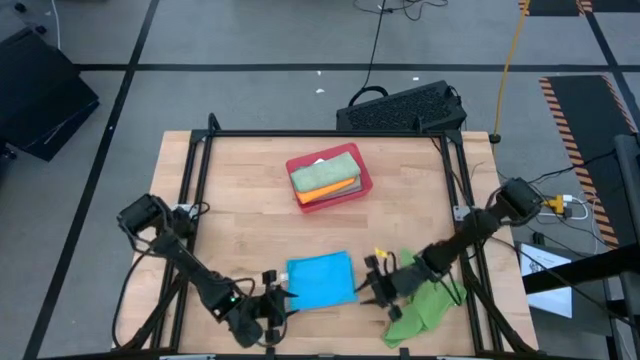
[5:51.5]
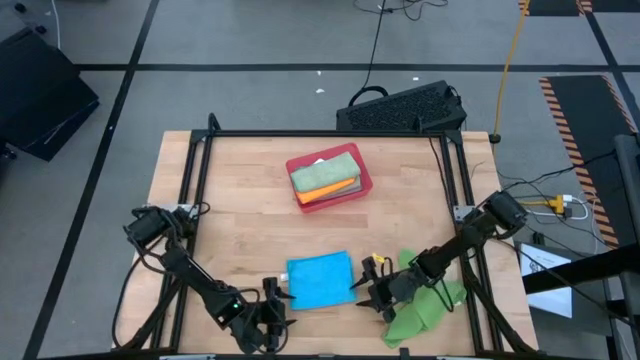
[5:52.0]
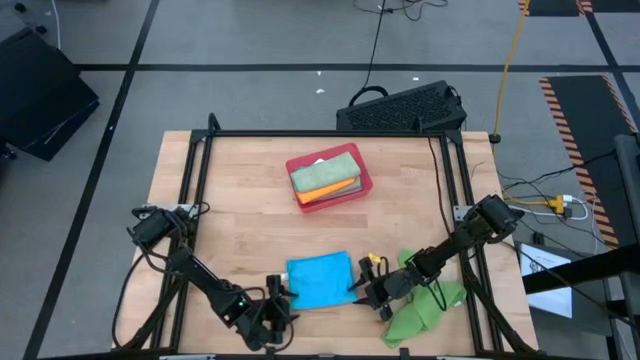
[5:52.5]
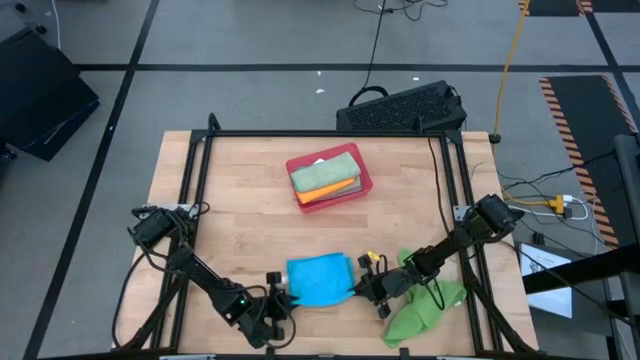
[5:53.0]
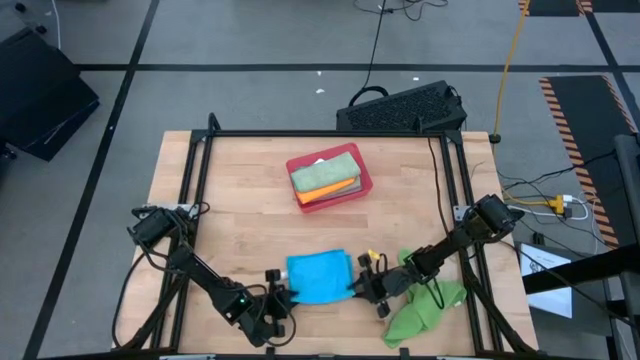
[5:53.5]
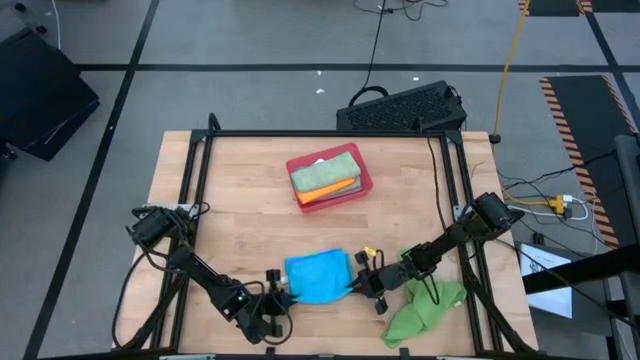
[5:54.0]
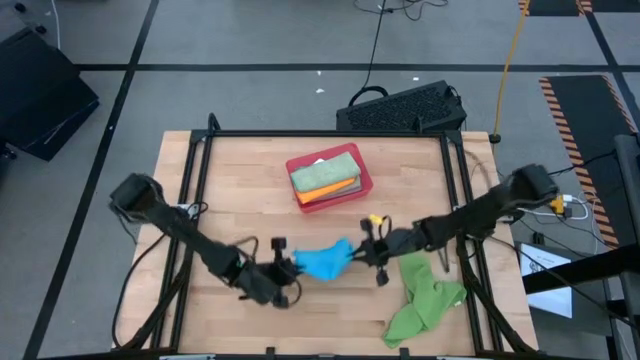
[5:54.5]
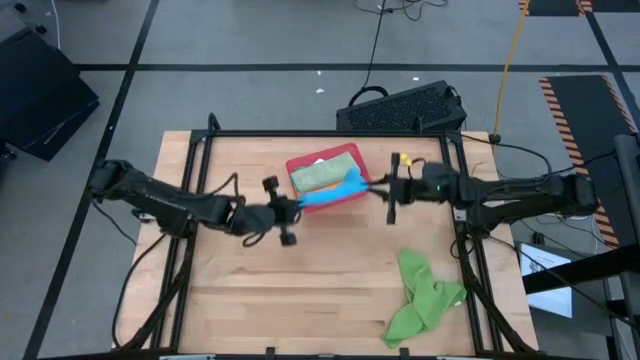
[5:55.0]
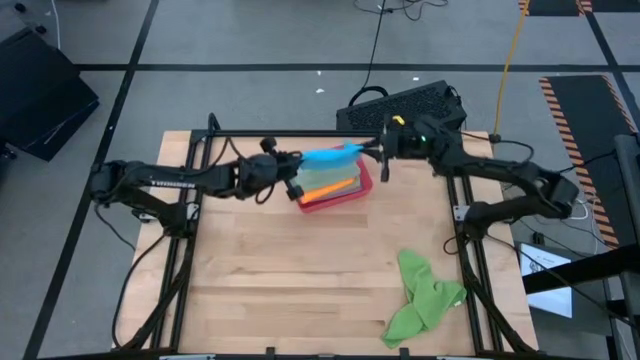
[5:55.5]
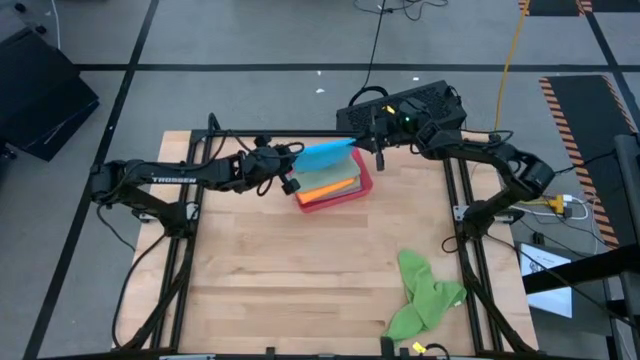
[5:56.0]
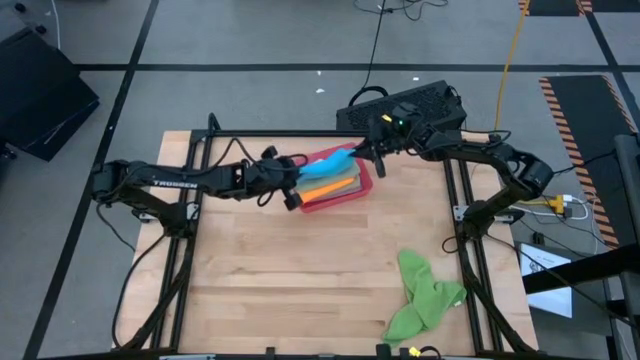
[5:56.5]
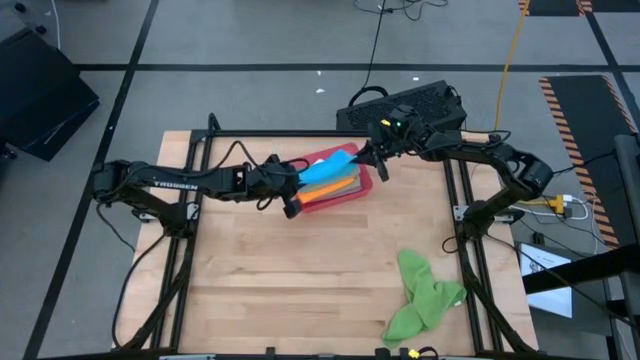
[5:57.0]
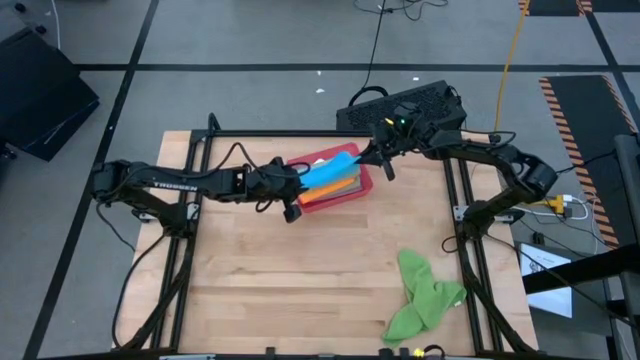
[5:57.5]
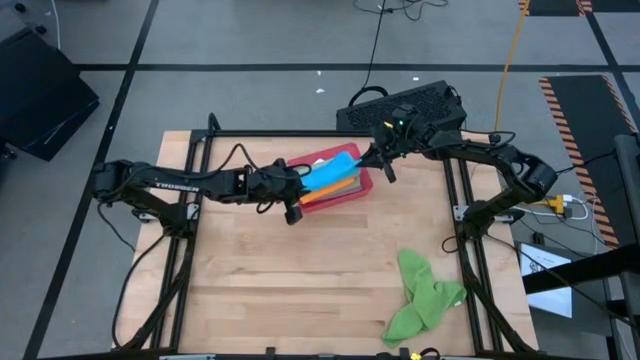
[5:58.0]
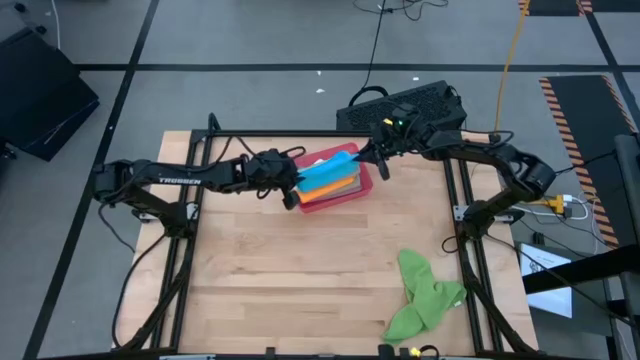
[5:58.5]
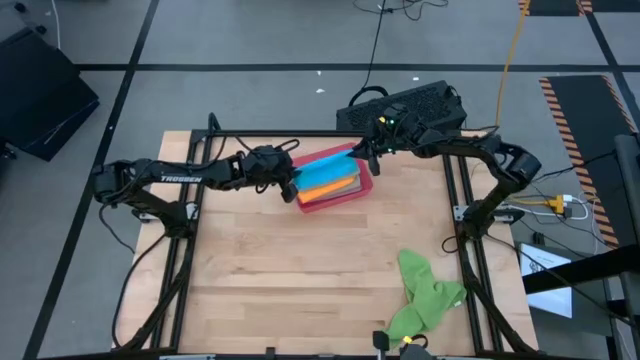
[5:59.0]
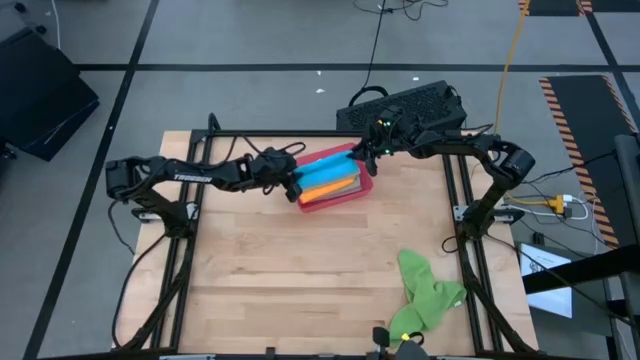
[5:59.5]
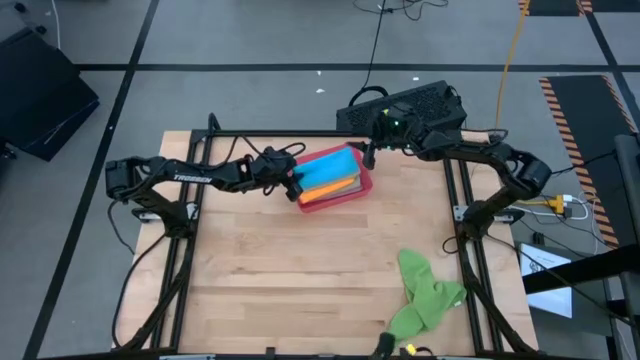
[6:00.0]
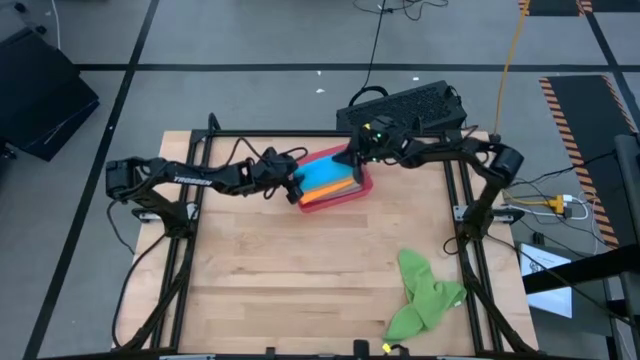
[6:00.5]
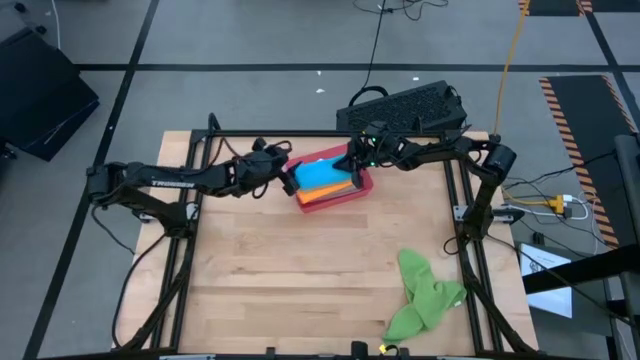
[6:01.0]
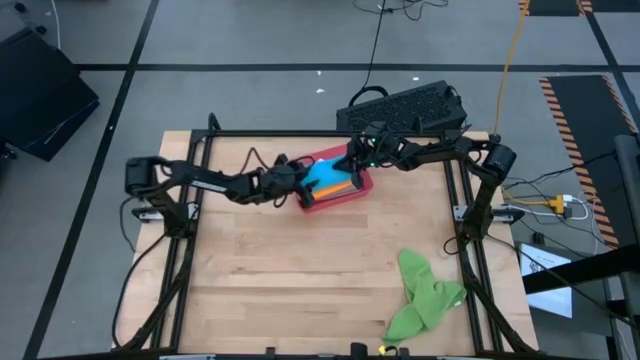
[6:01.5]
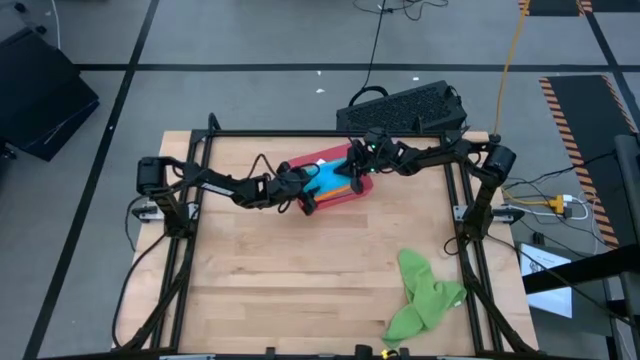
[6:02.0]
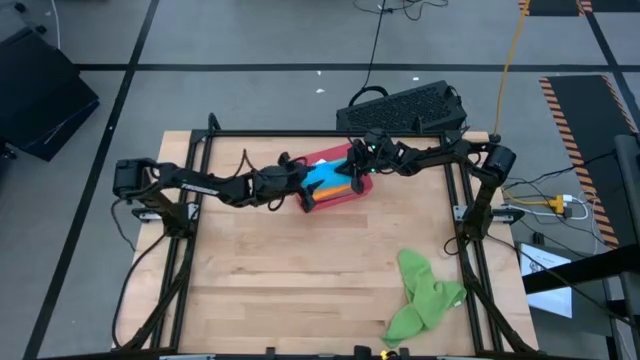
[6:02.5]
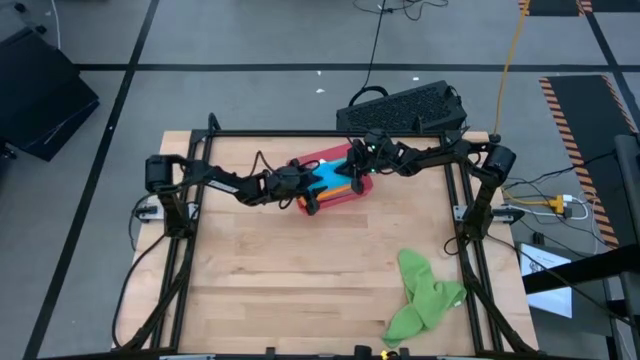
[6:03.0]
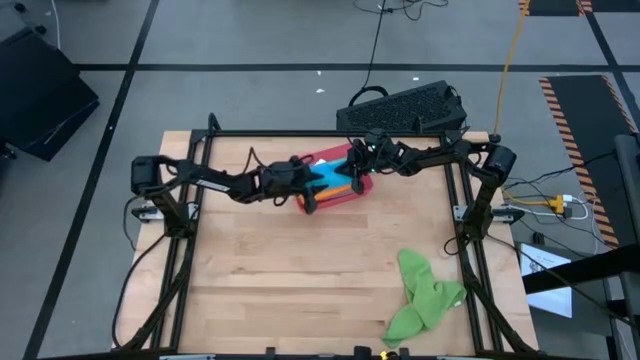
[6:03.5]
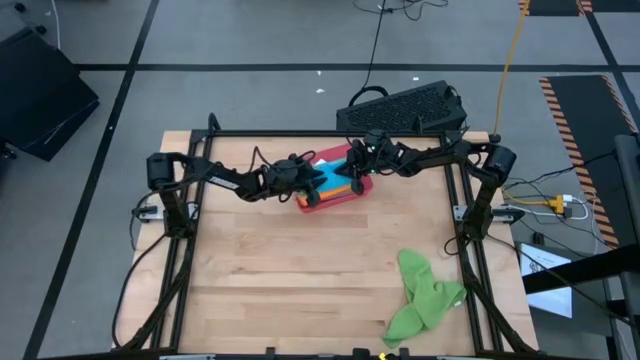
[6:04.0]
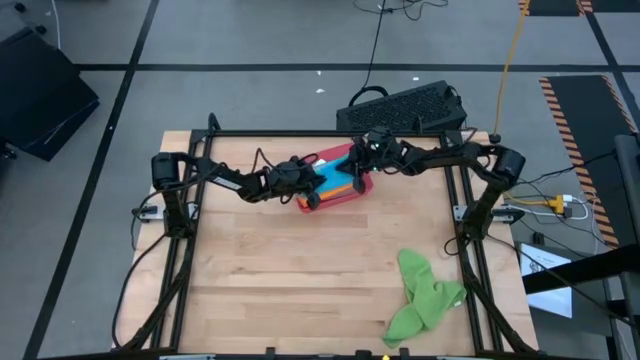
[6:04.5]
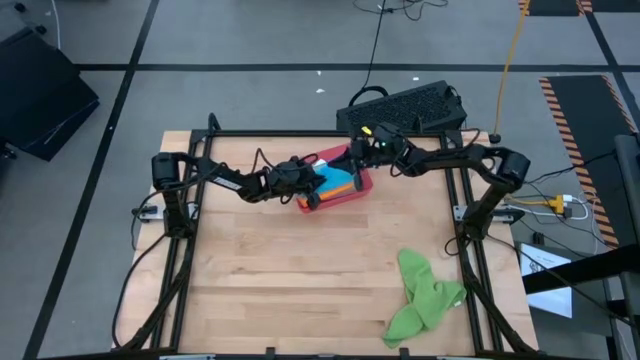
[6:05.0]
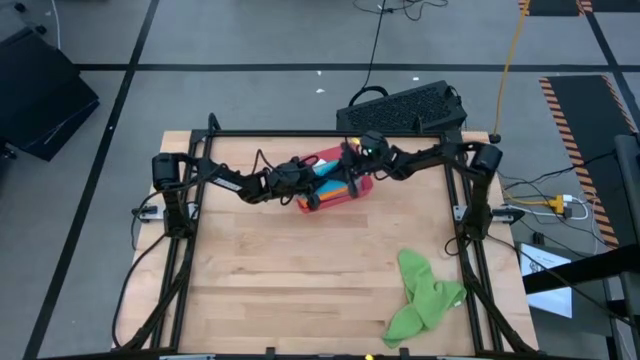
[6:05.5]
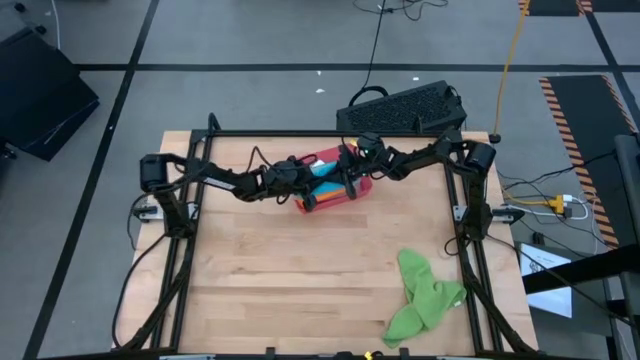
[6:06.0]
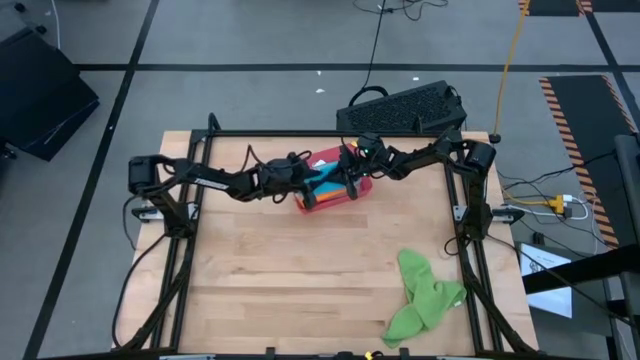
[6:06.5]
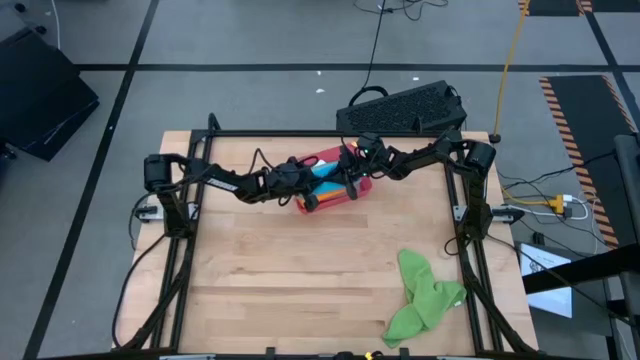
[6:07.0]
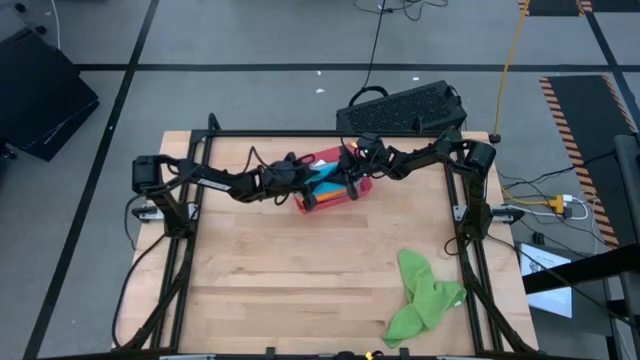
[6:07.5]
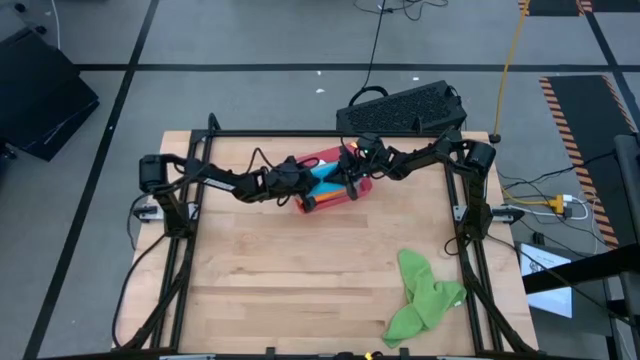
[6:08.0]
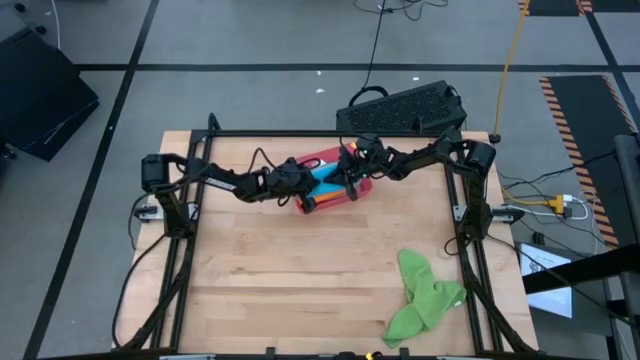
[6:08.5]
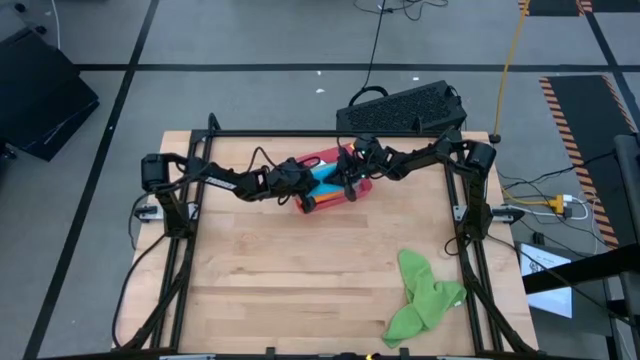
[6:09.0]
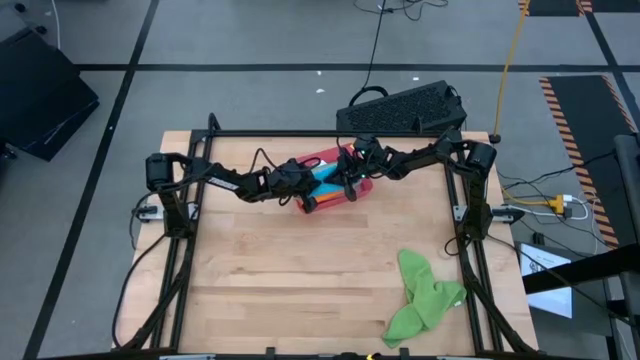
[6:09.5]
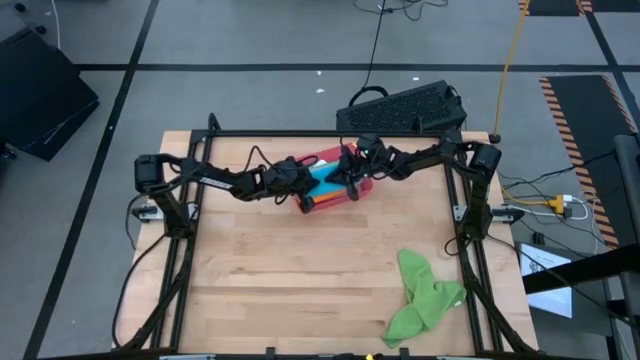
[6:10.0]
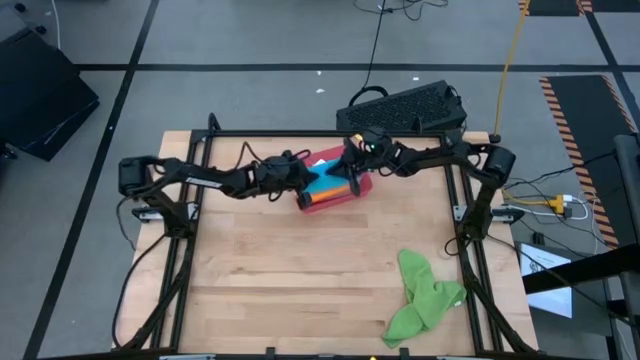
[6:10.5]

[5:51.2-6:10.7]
Task: Fold microfiber towels
Put the folded blue microfiber cloth into the red bin
